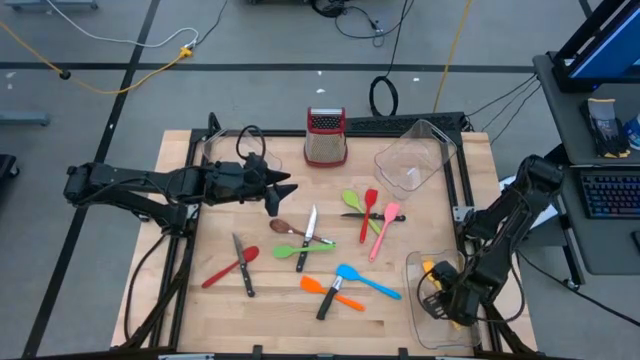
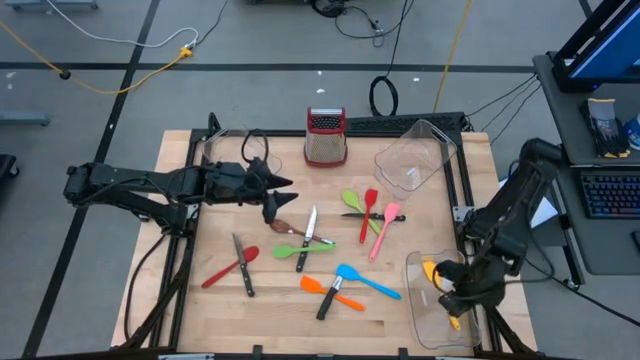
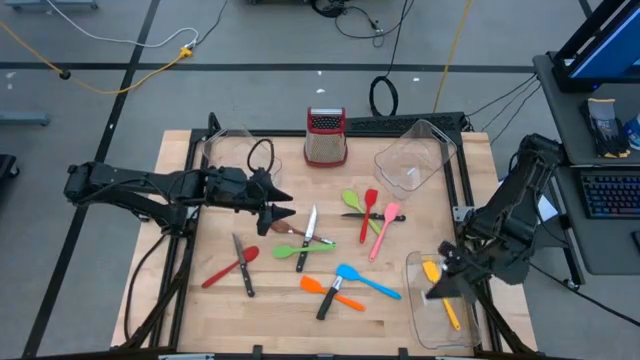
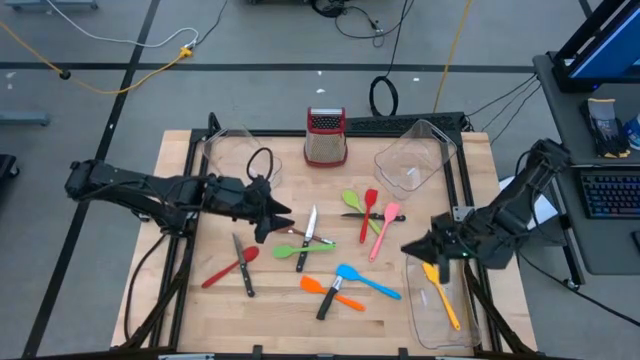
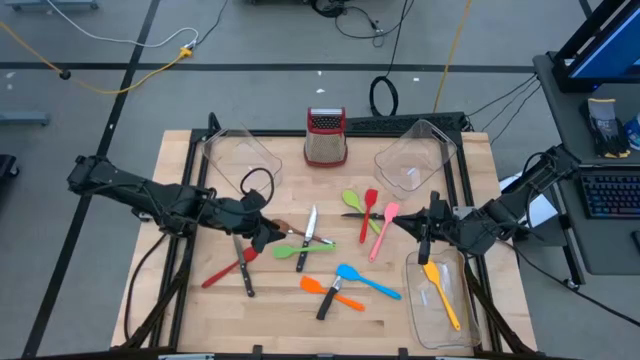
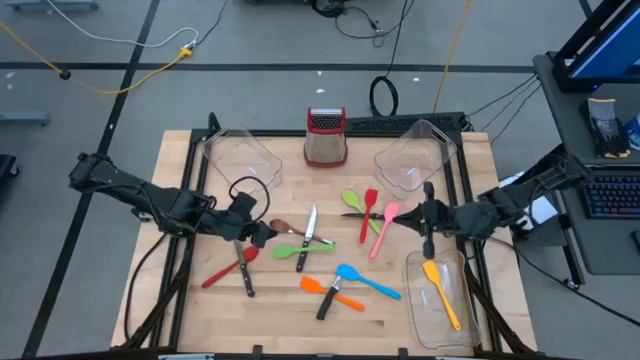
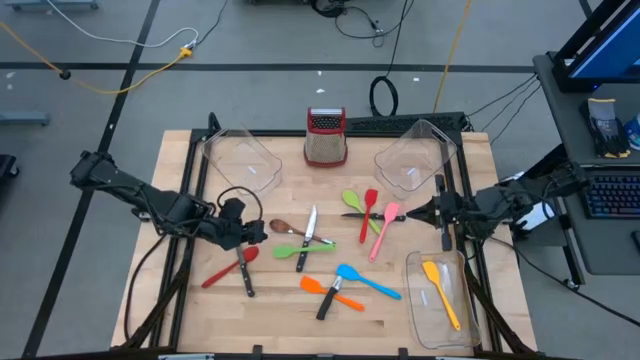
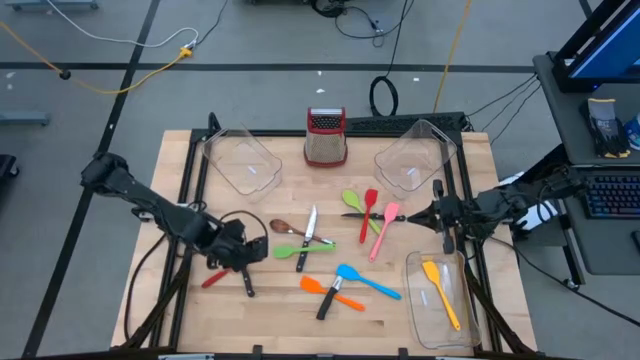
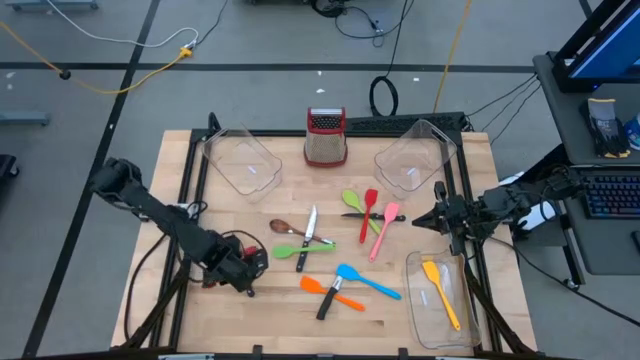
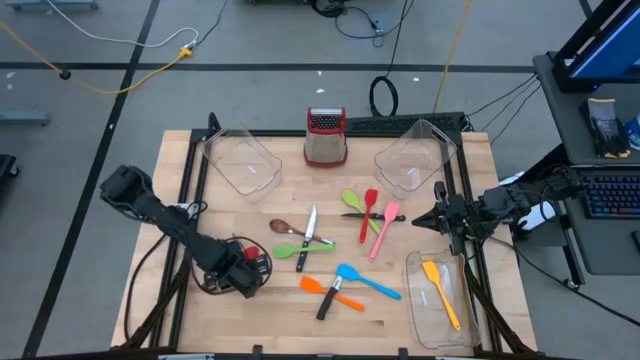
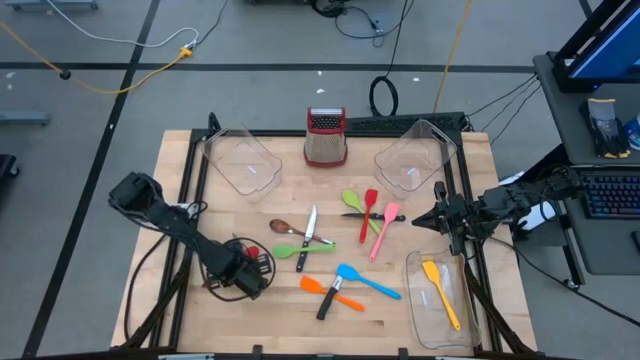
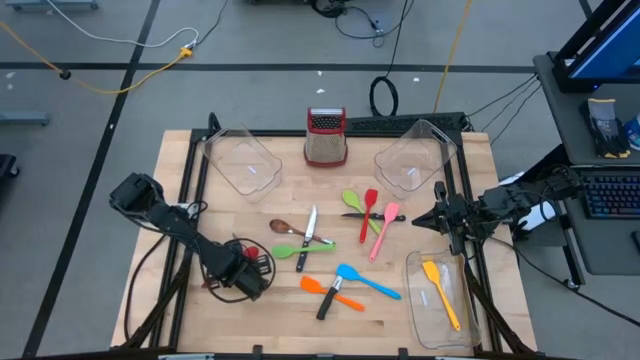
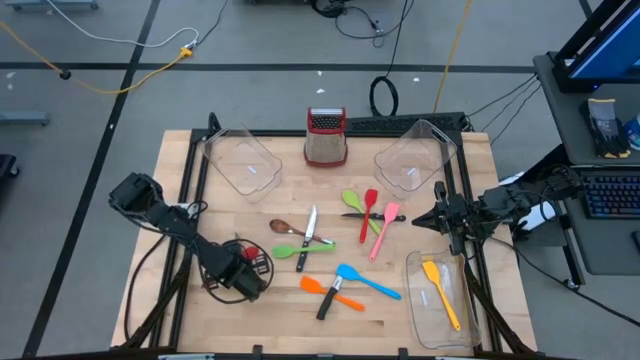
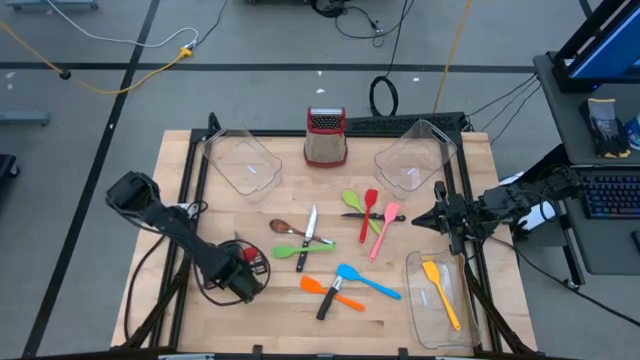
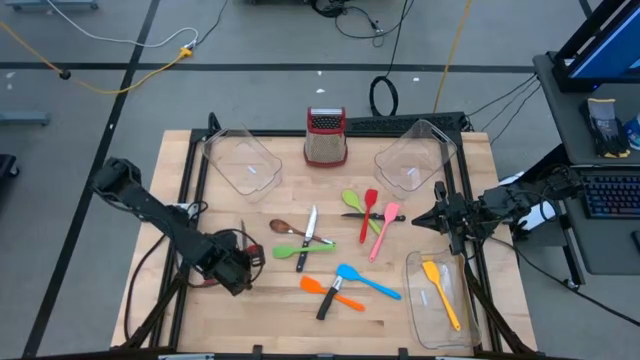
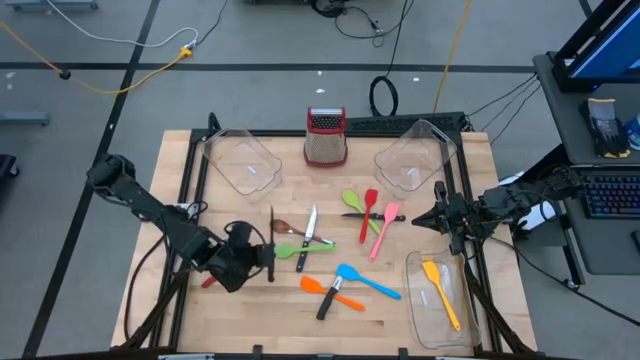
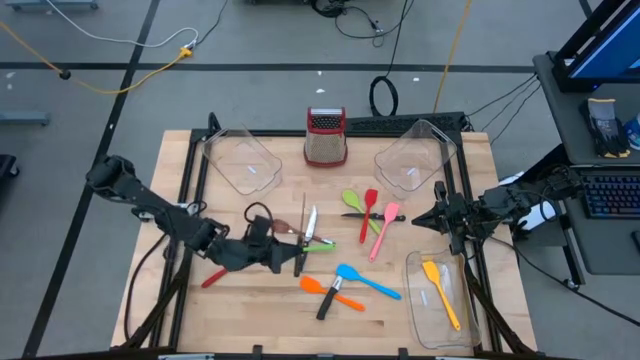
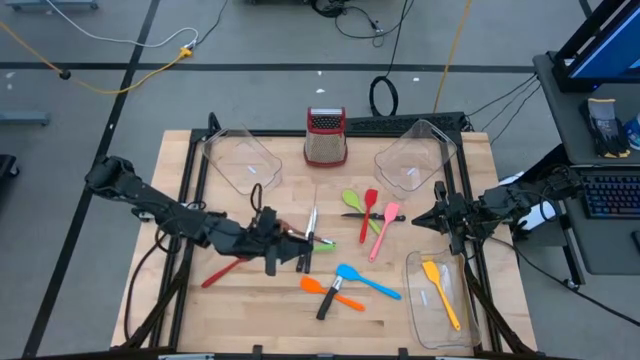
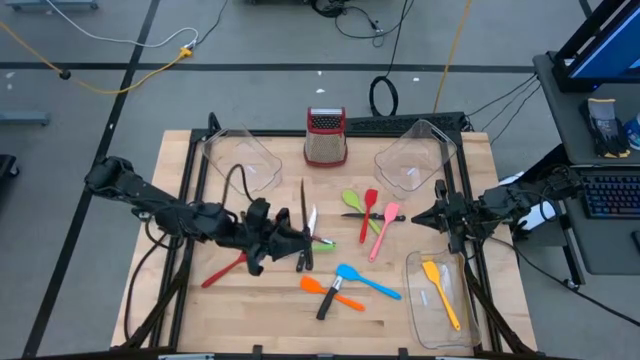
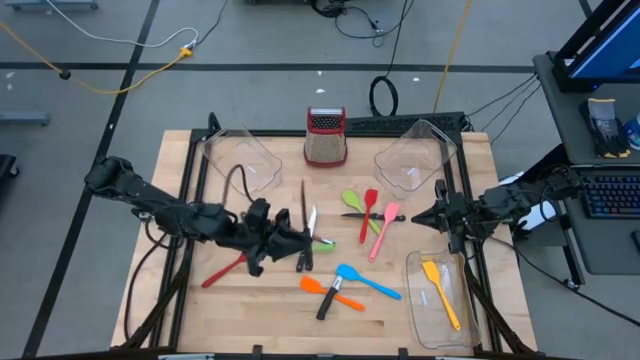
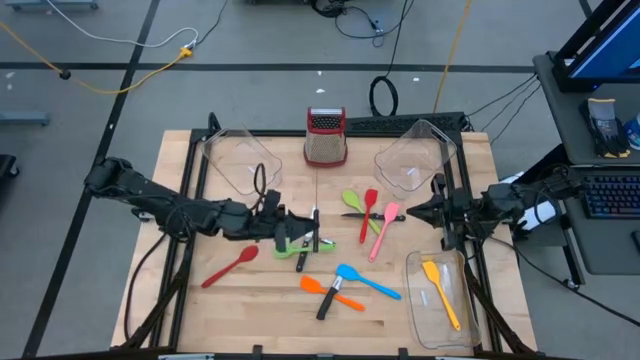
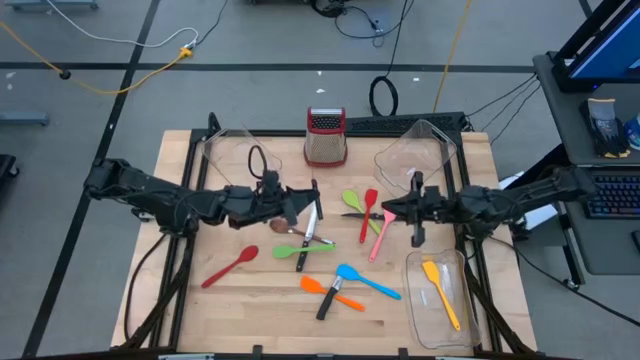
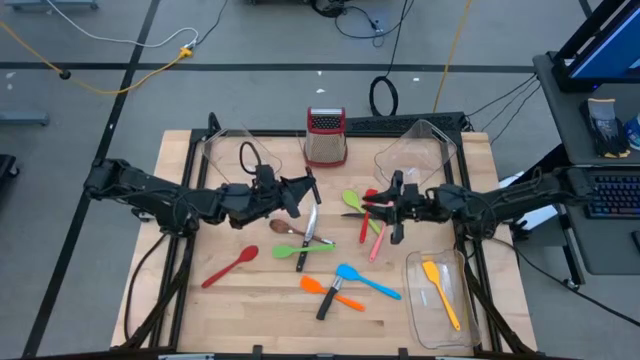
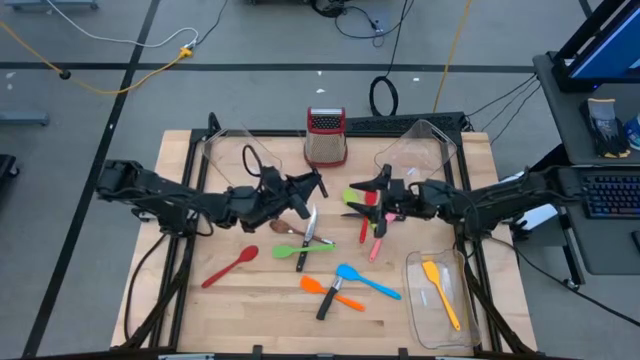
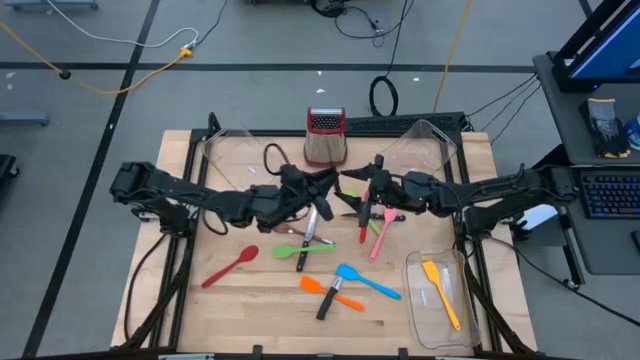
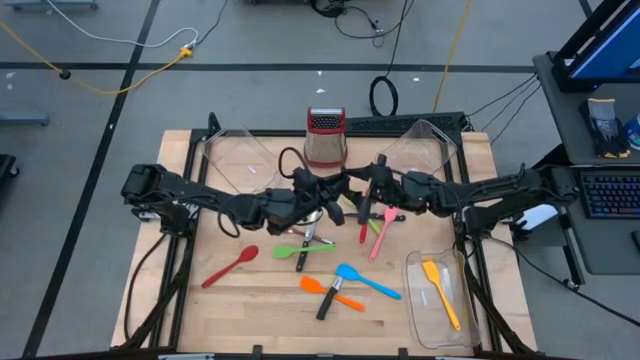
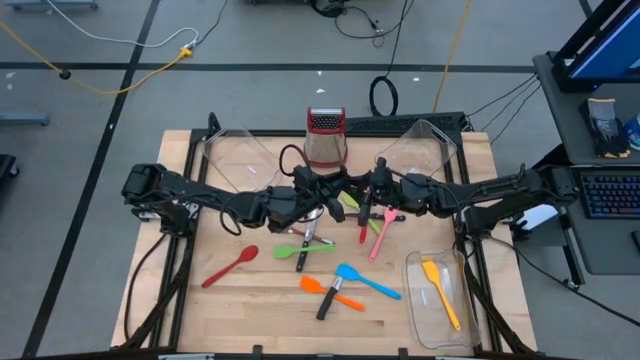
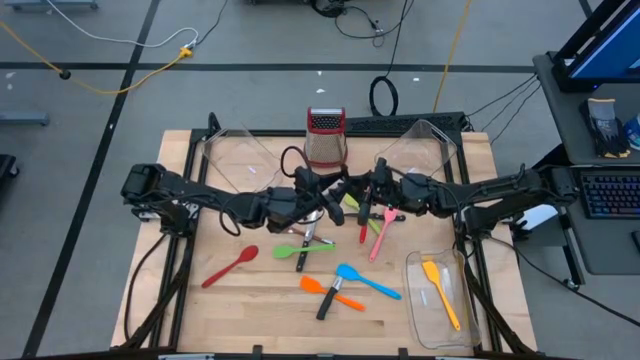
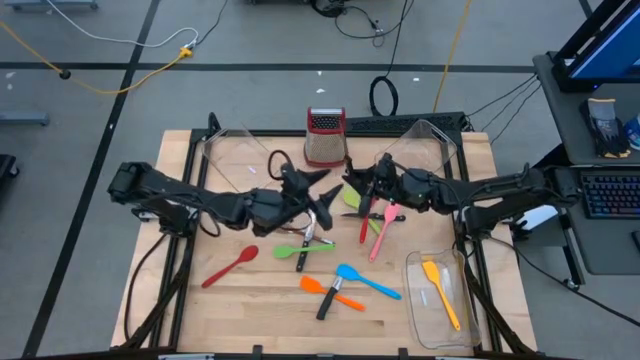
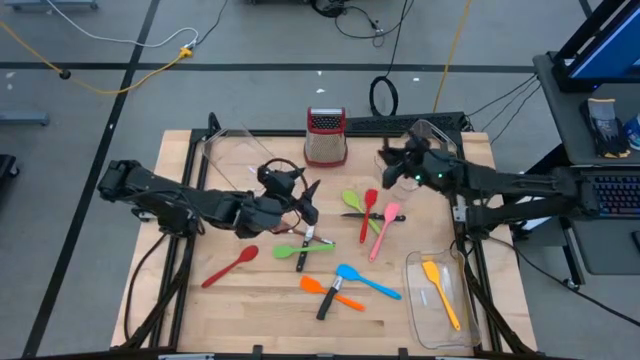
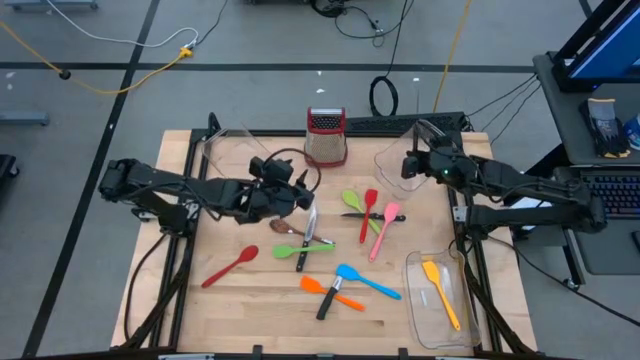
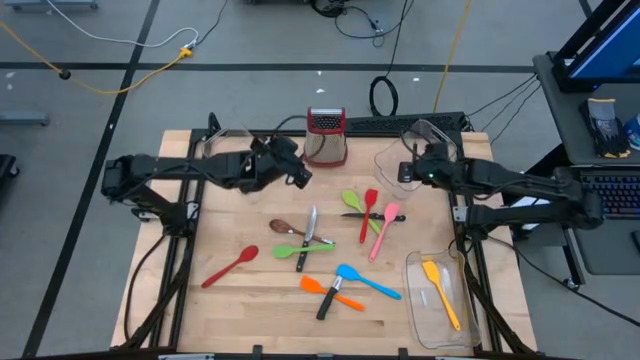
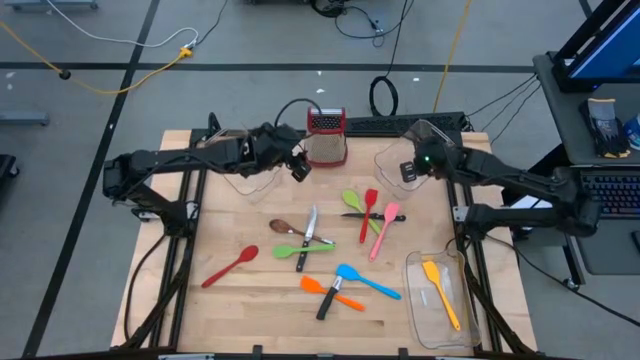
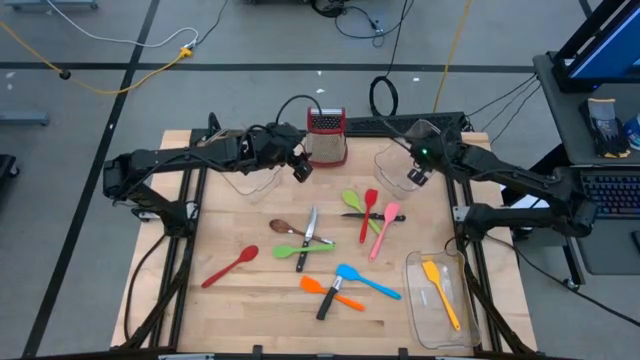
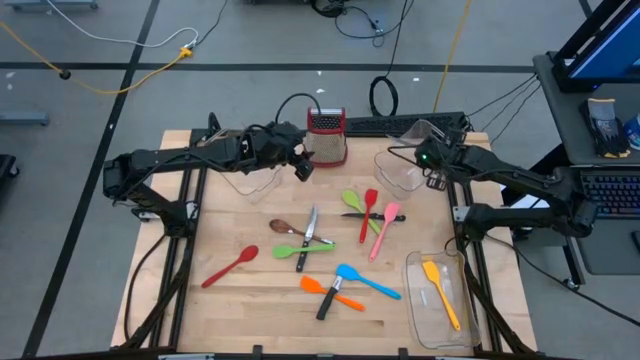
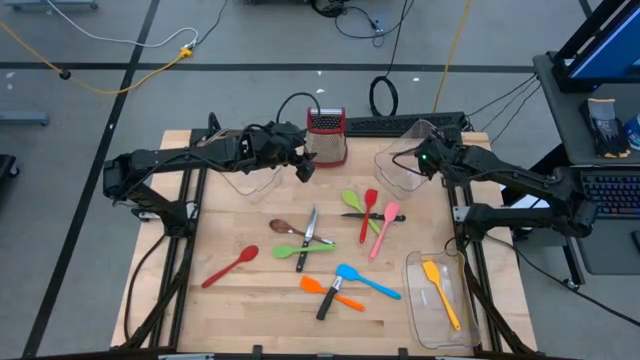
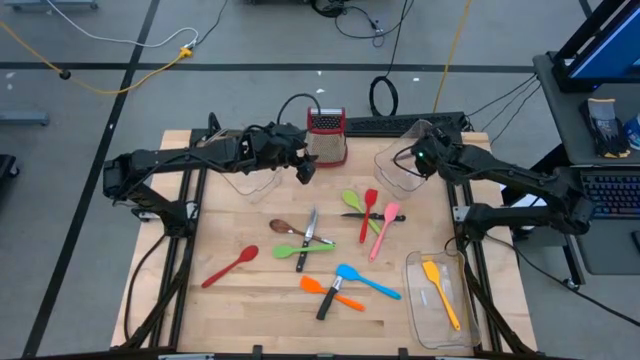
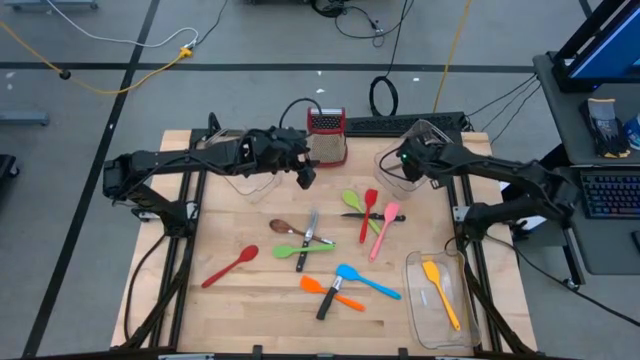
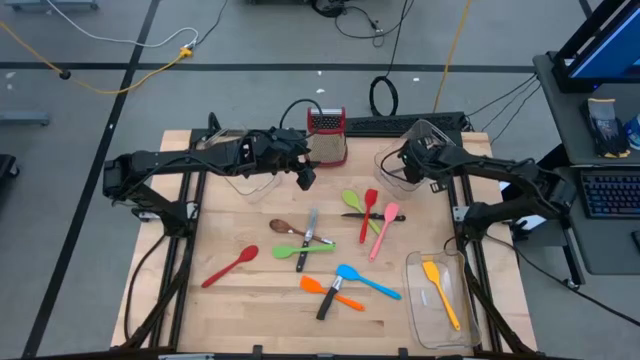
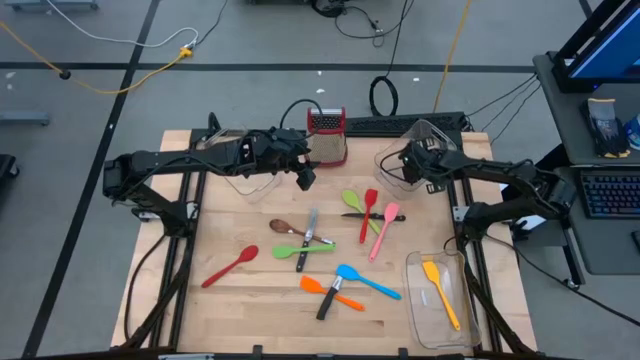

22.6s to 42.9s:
Task: Pick & Place Kitchen Items
Put the bottom black kitchen knife into the top right transparent bin

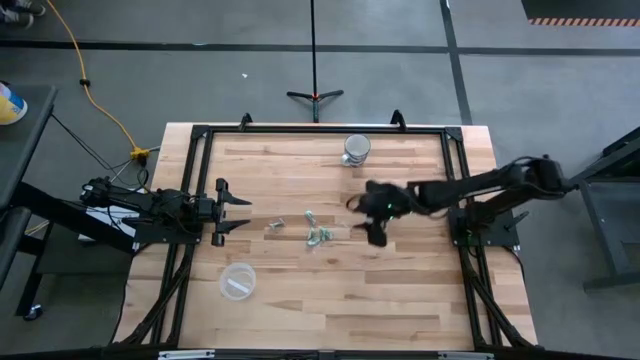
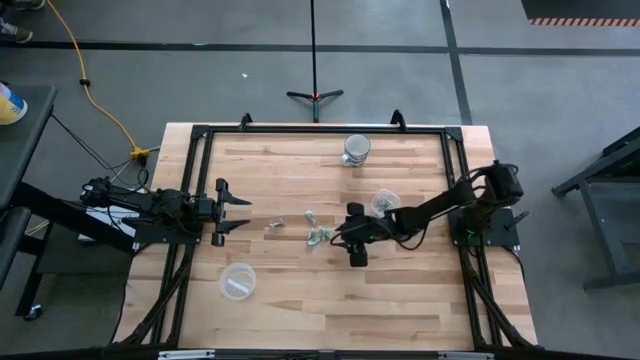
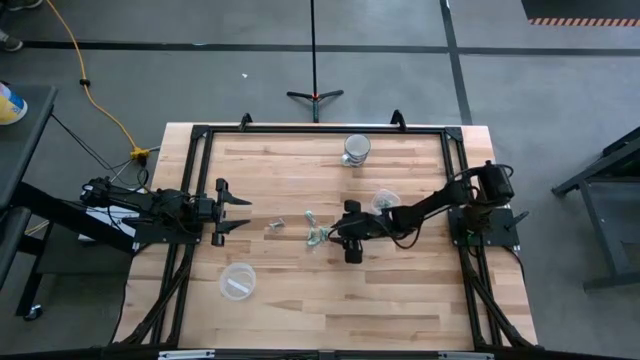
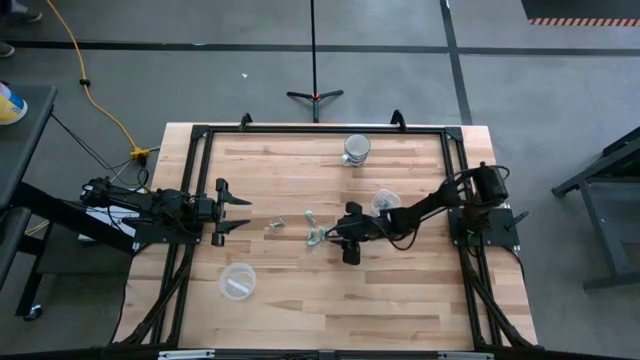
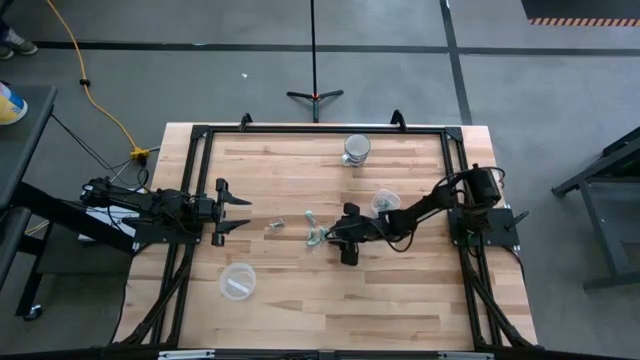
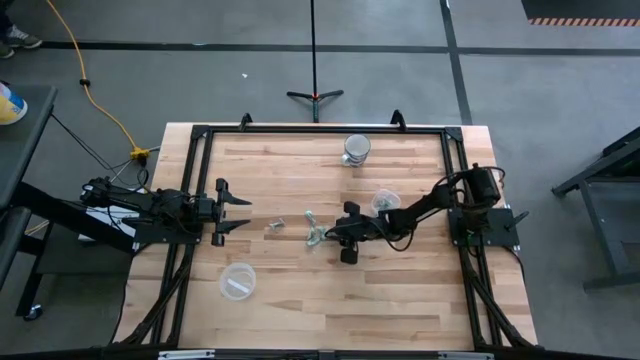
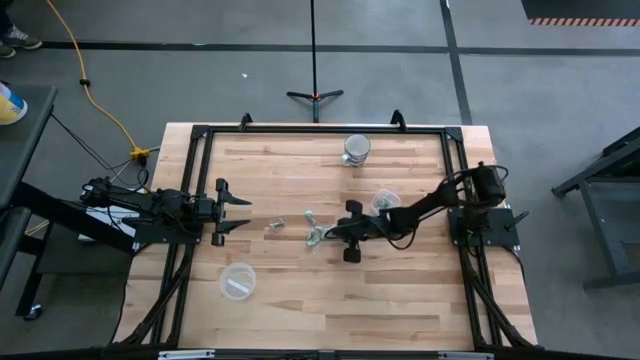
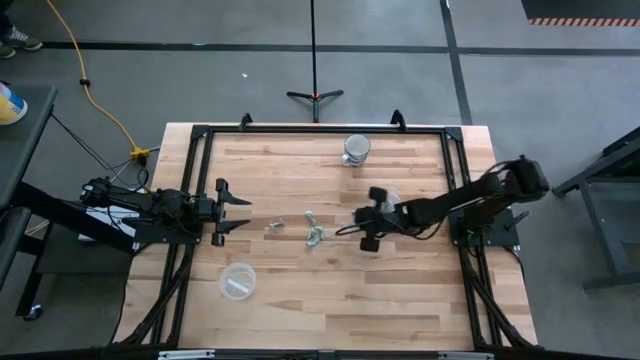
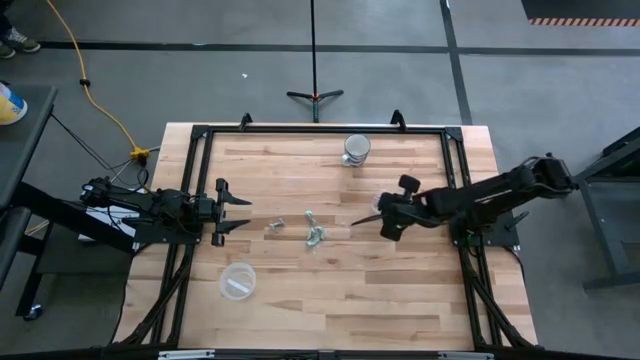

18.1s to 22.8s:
Task: Pick and place Stevia / Truvia into bins
Put the stevia packet into the square transparent container
